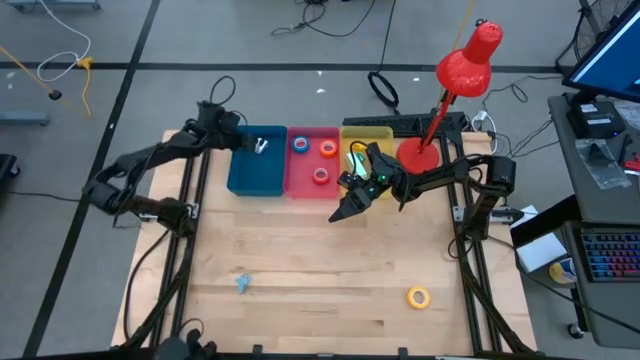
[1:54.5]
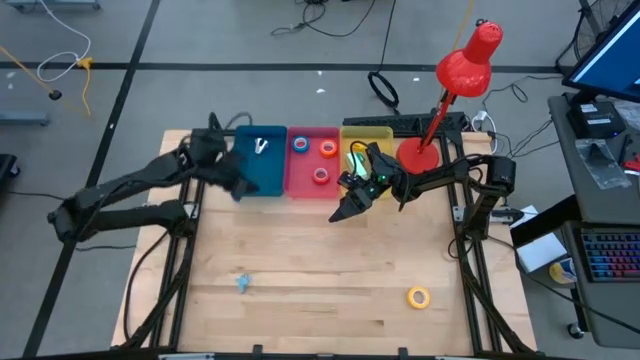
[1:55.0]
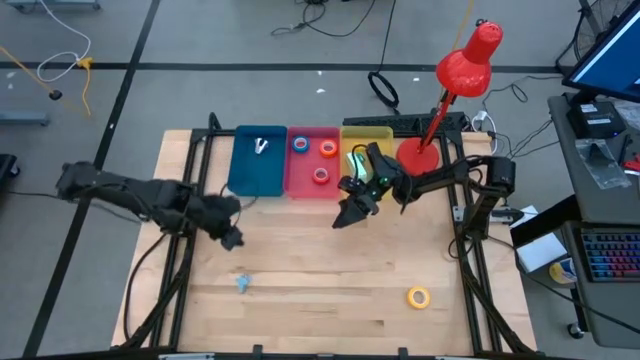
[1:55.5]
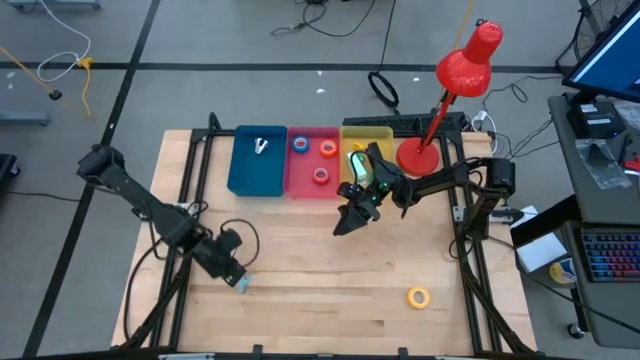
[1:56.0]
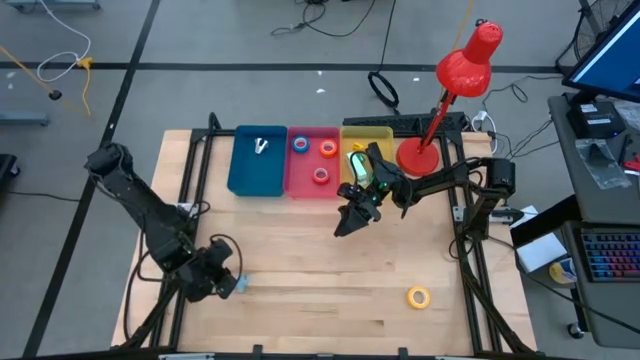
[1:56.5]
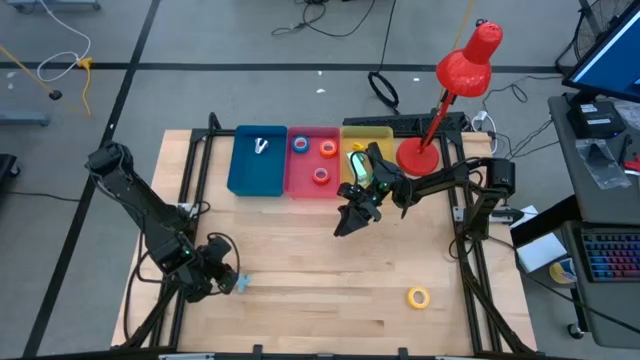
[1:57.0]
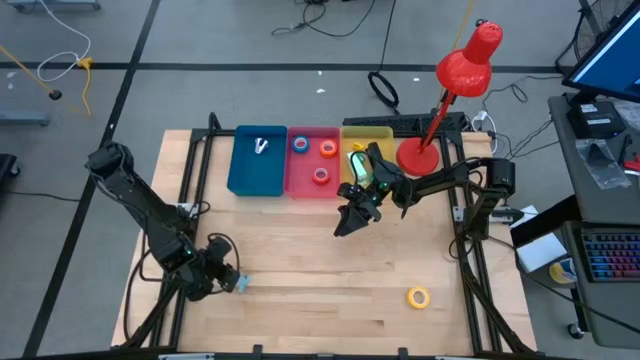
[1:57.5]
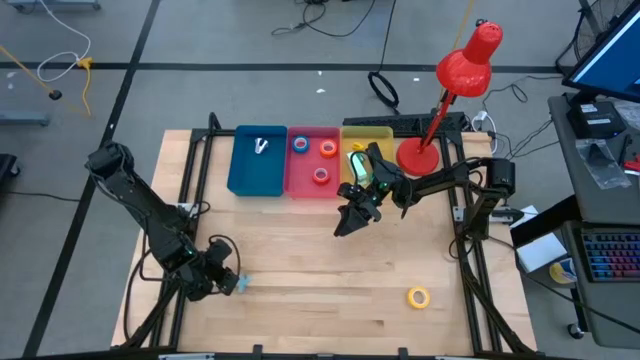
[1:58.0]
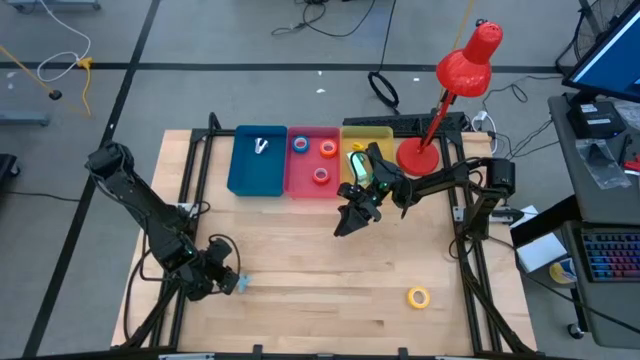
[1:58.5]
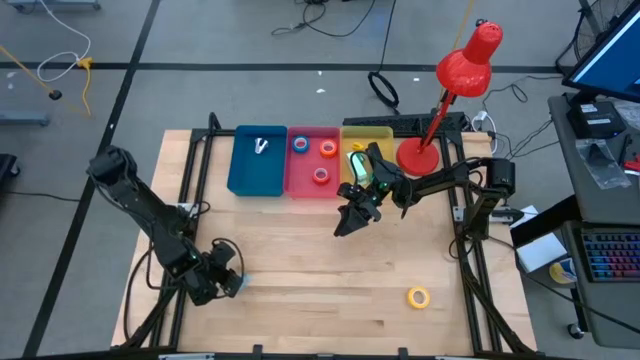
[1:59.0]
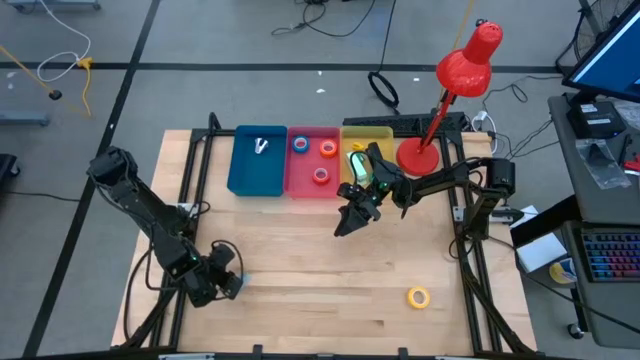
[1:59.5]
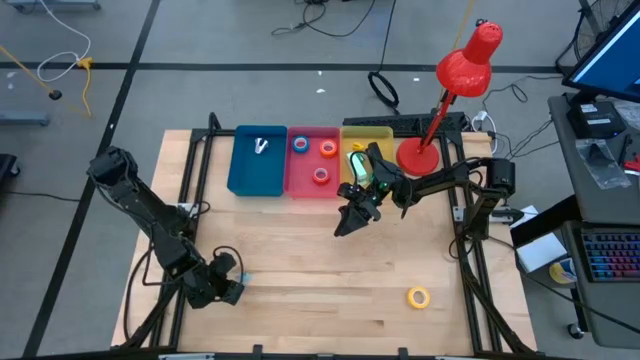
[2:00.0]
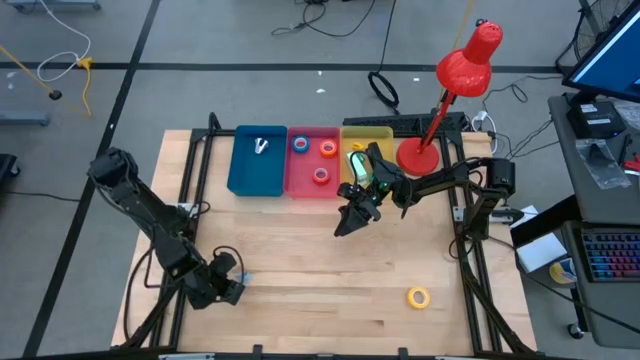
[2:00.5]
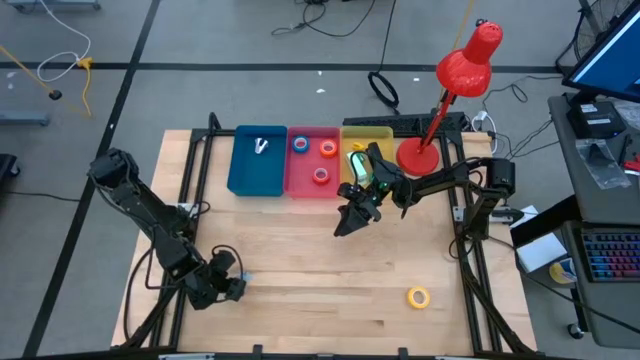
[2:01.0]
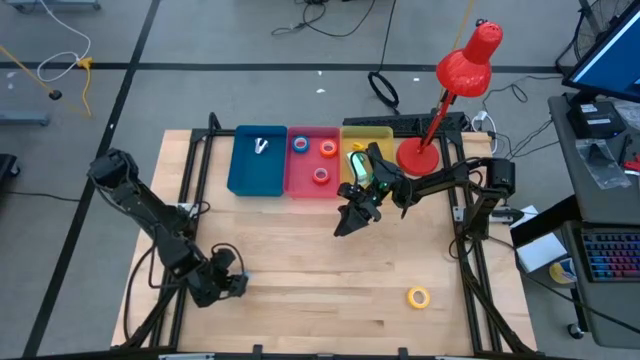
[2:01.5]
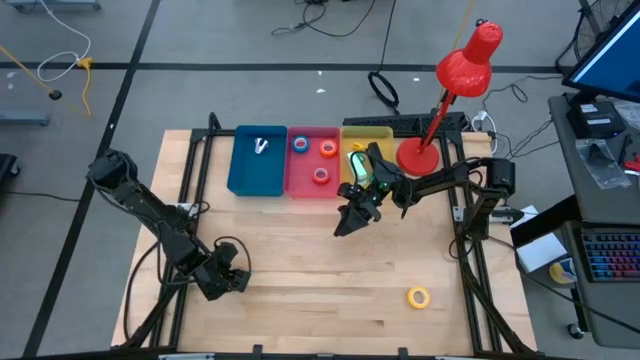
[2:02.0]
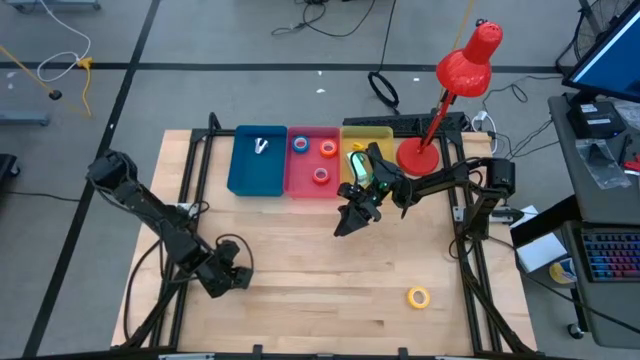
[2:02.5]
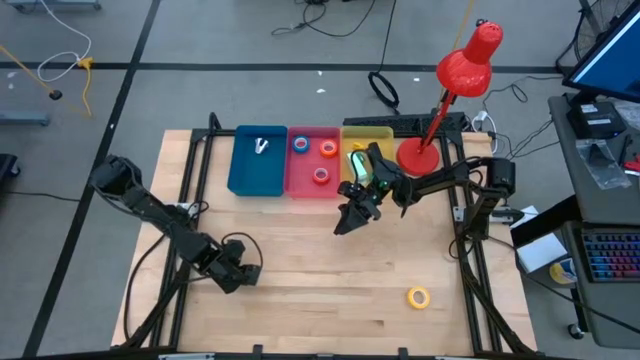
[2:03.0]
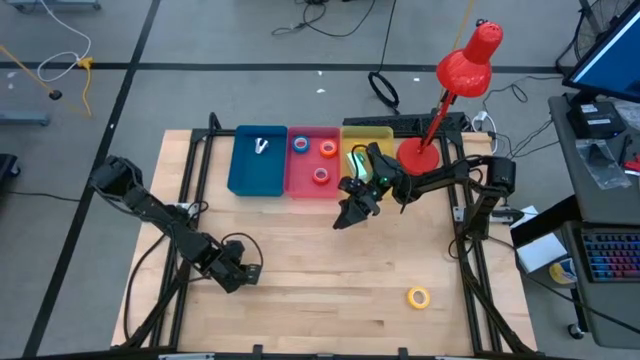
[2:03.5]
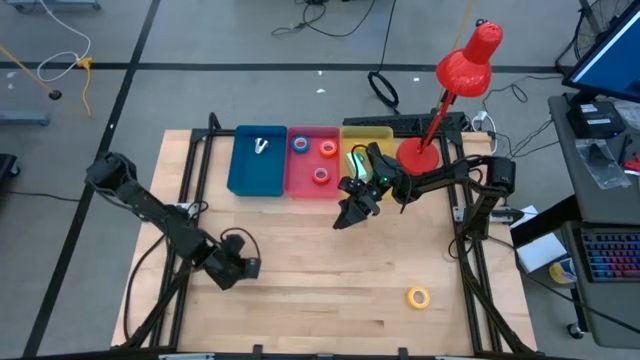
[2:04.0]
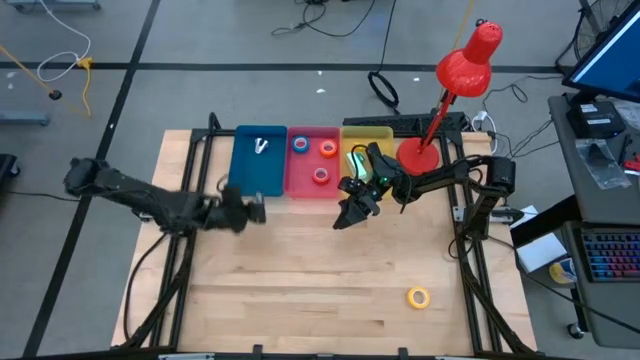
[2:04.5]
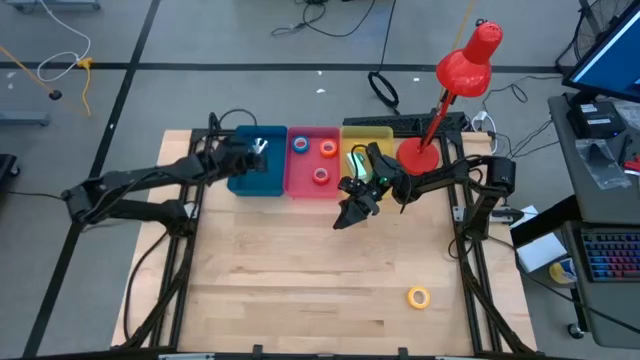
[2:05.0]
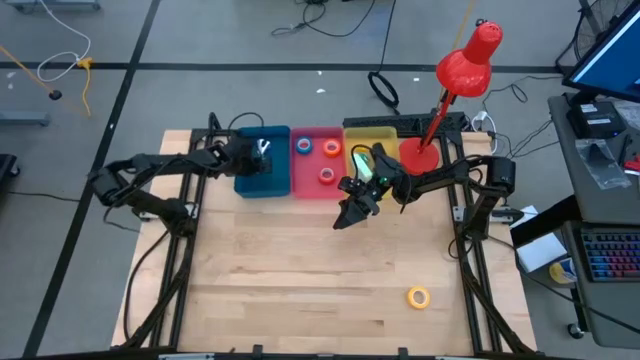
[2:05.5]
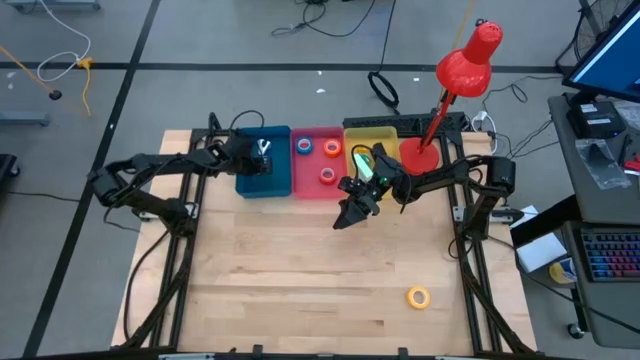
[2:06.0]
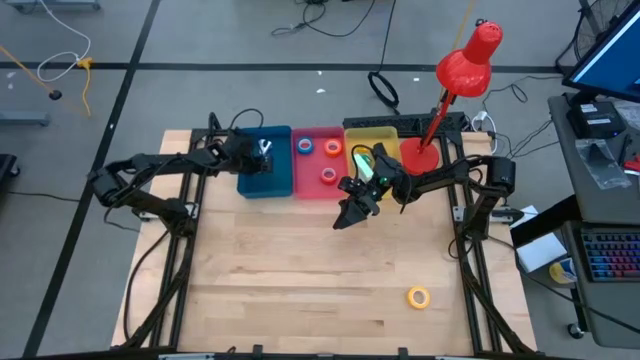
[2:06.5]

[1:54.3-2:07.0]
Task: Pick and place Stapler, Stapler remover, tape
Put the blue staple remover into the blue bin

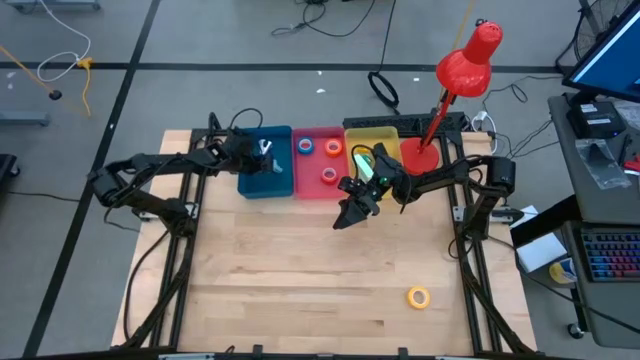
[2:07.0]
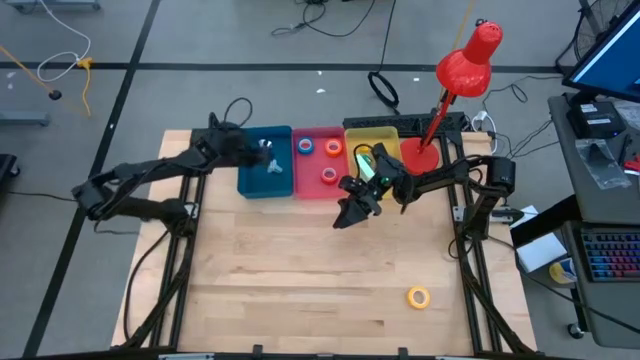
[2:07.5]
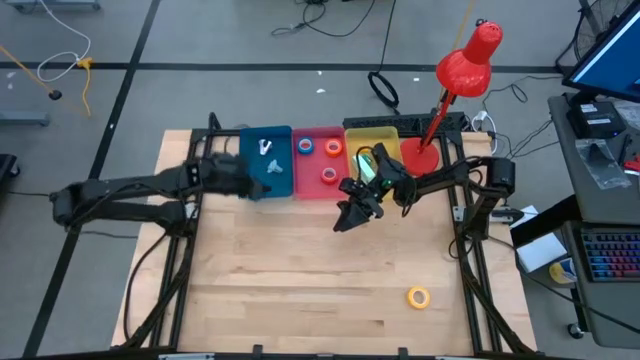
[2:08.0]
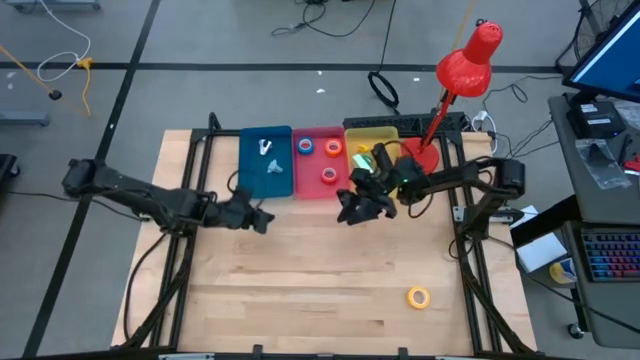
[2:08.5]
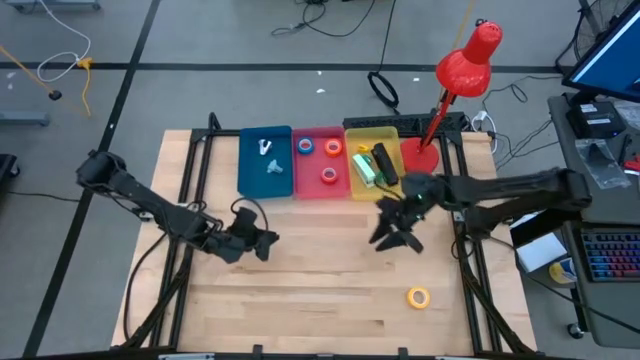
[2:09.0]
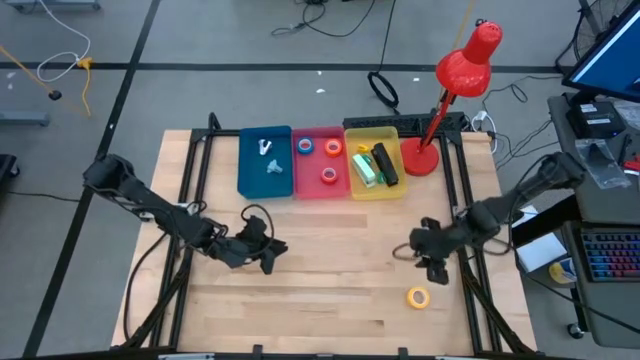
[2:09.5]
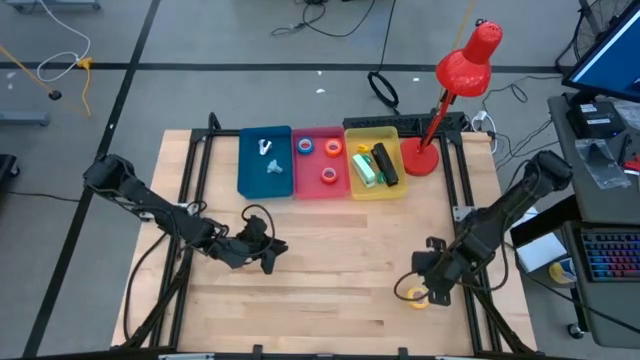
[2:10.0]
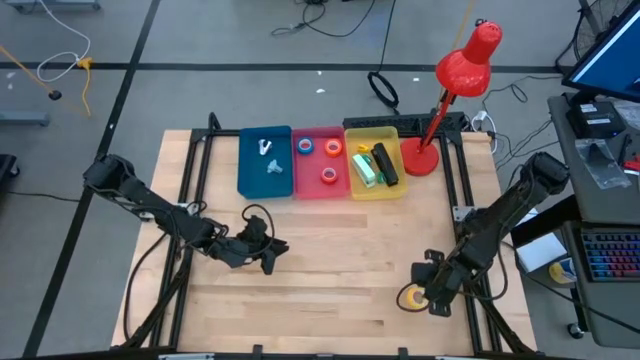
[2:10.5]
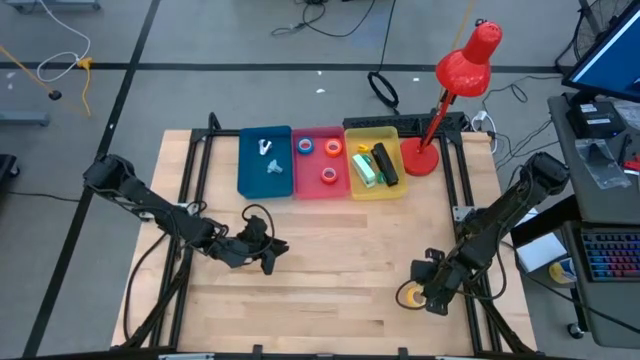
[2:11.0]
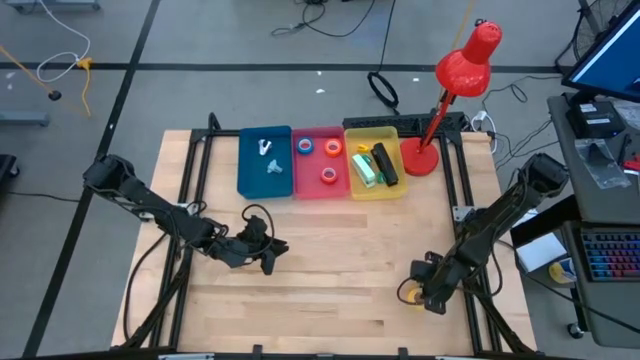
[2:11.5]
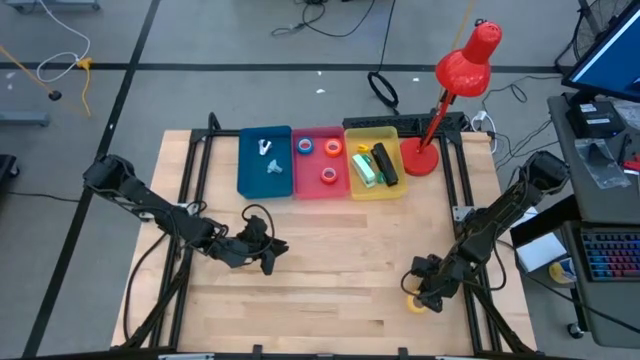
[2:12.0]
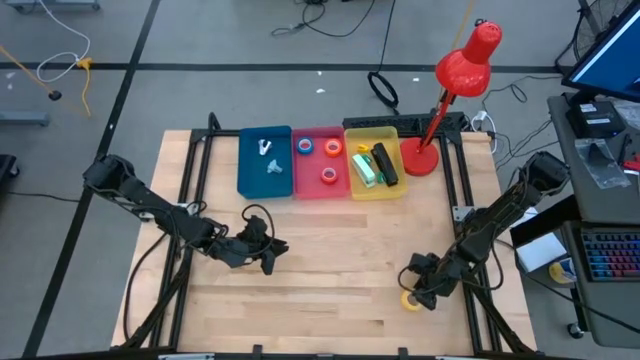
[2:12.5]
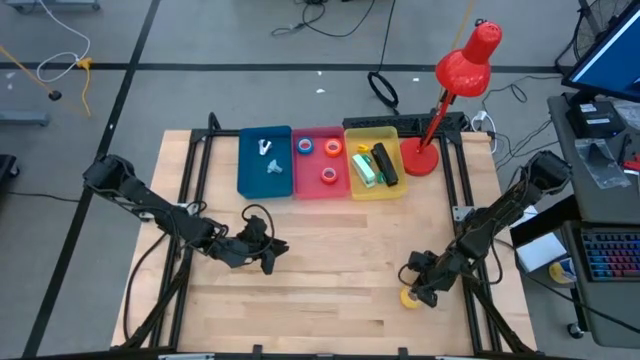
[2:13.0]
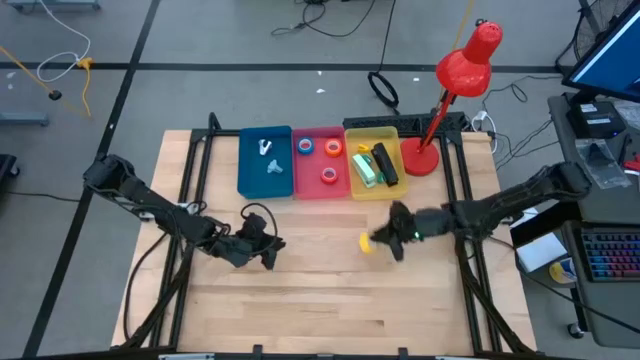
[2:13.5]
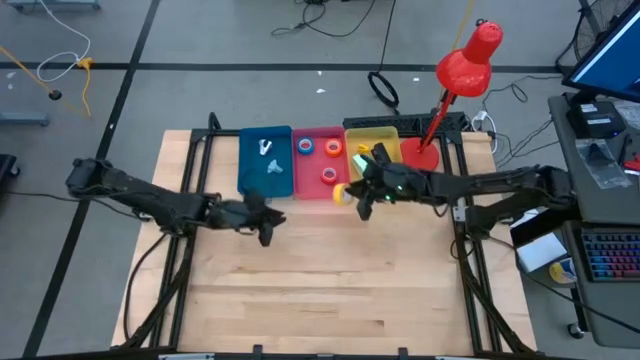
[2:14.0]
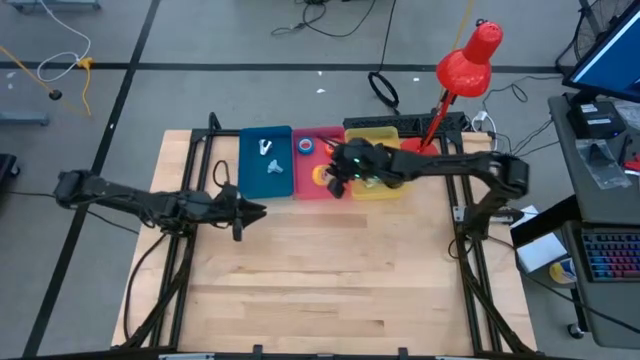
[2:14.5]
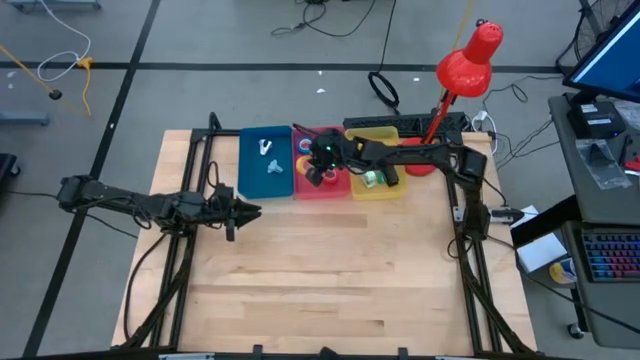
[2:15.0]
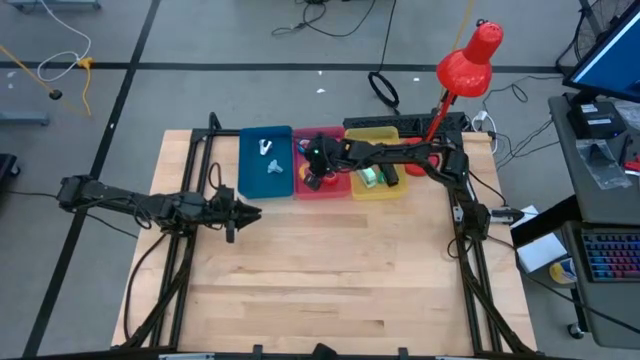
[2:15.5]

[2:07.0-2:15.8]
Put the yellow tape into the pink bin
